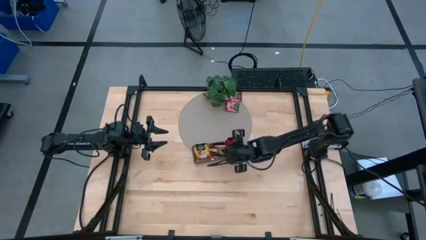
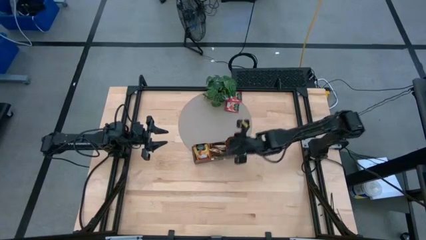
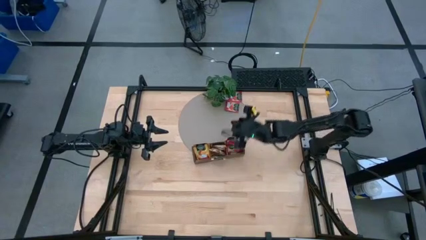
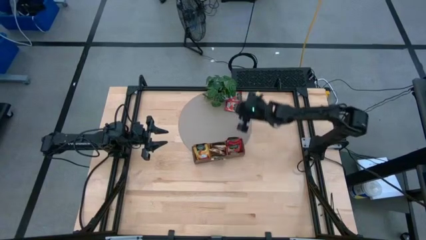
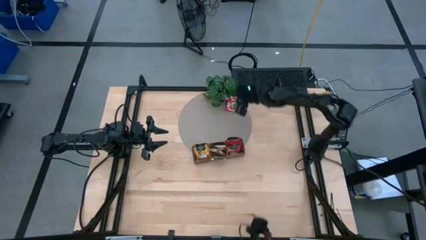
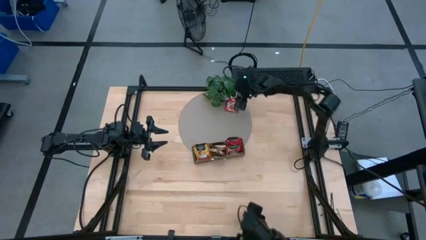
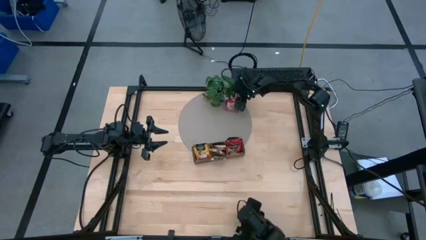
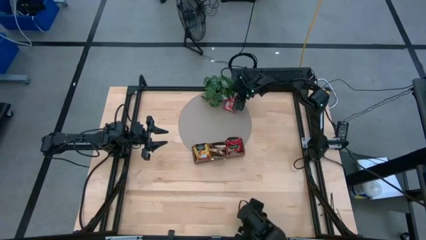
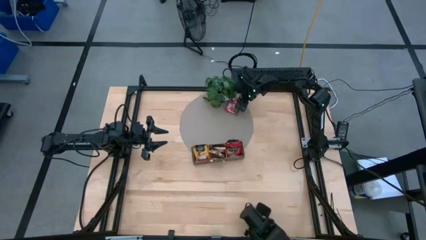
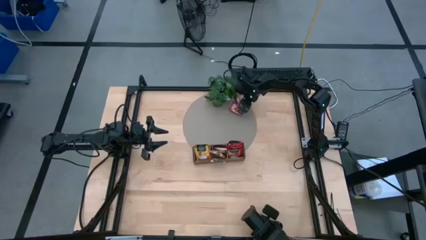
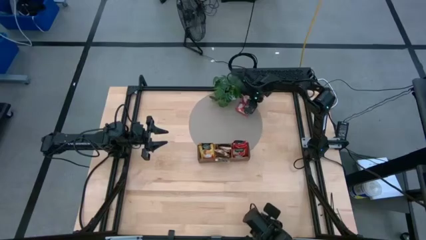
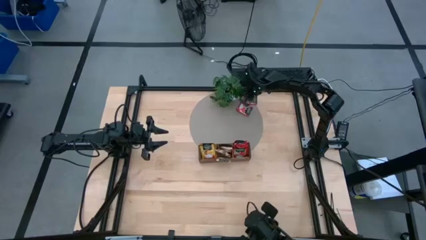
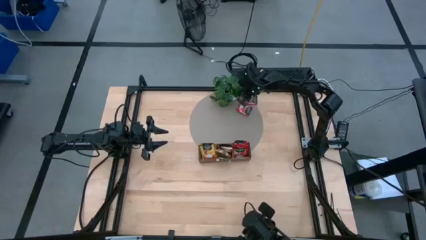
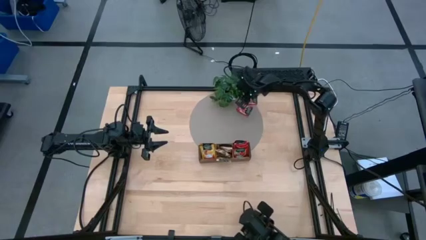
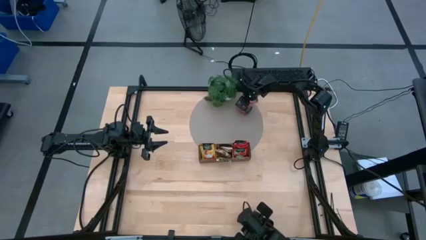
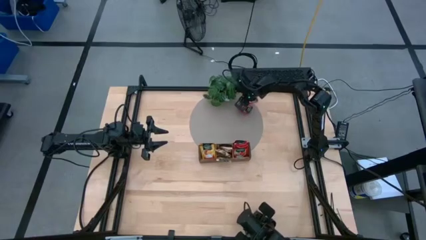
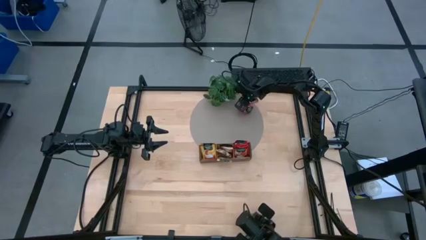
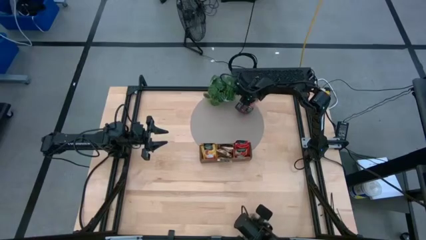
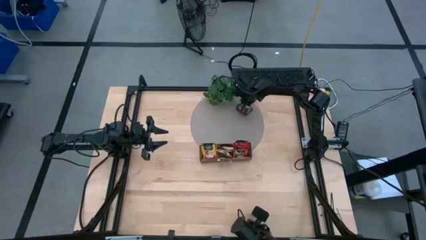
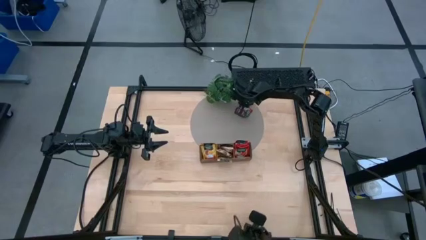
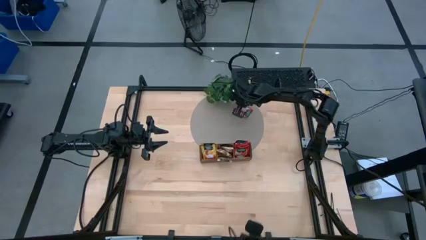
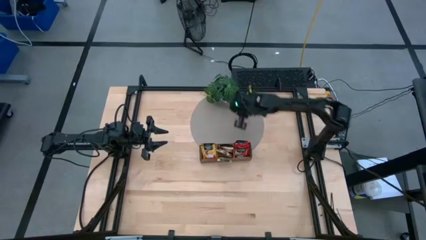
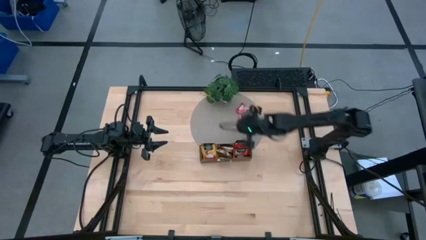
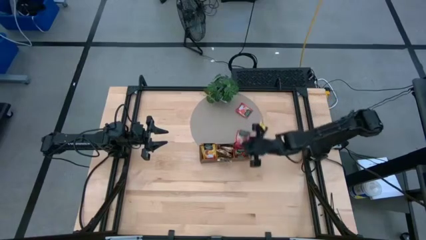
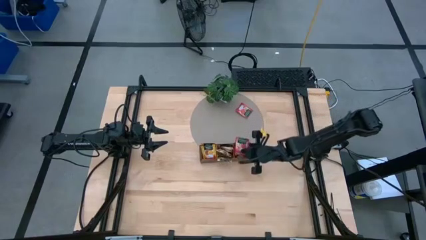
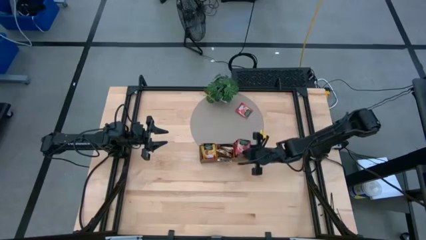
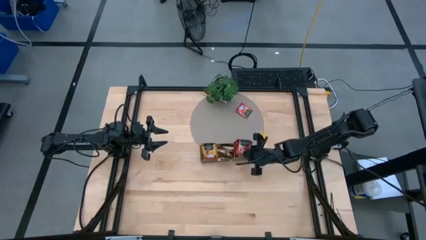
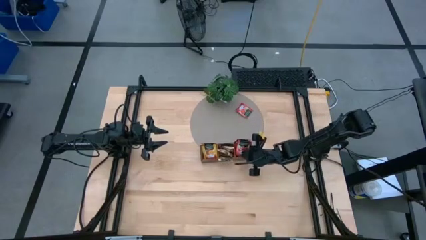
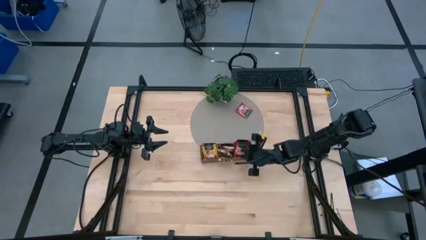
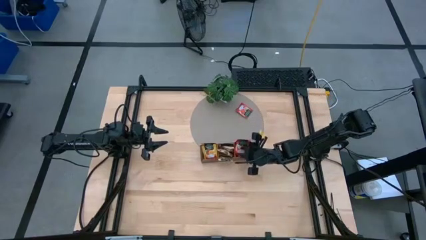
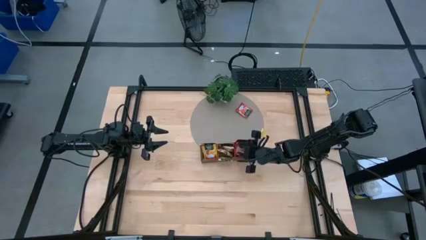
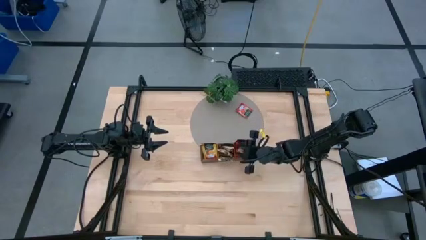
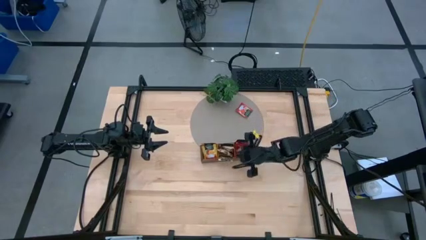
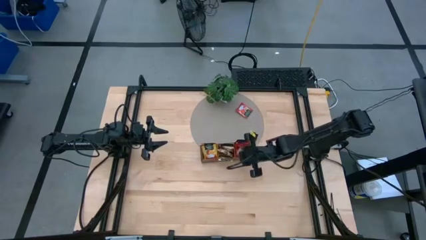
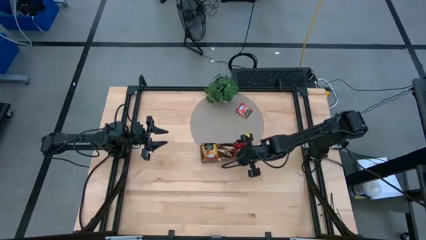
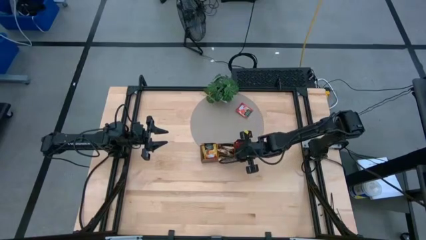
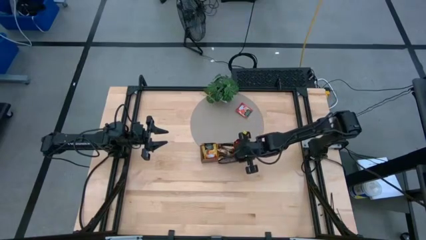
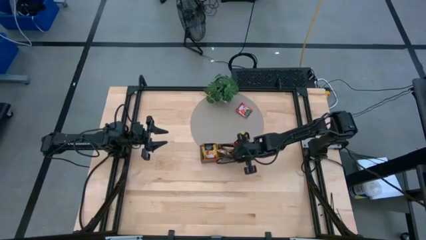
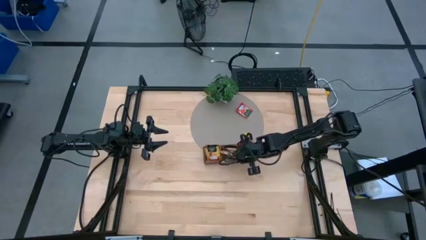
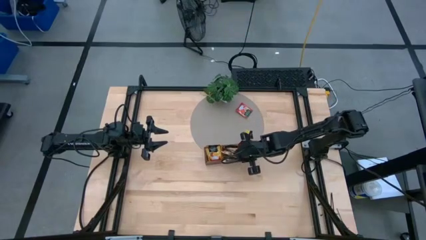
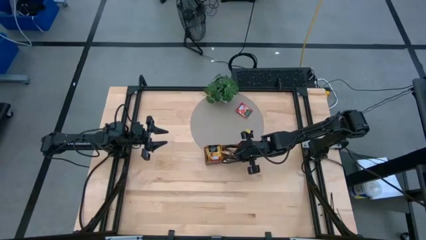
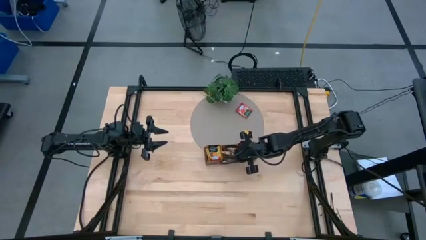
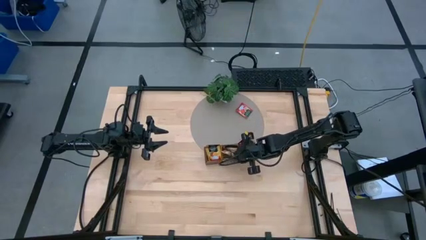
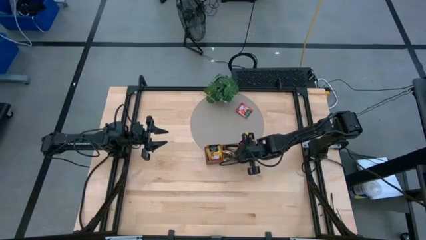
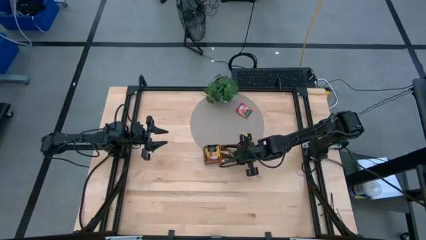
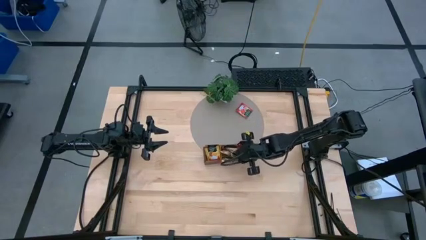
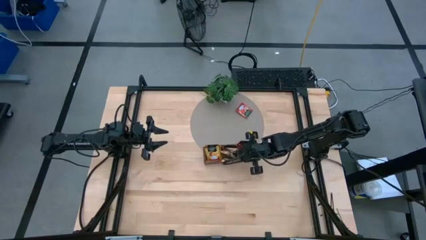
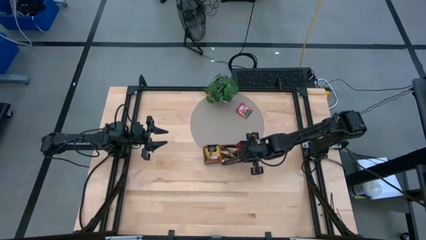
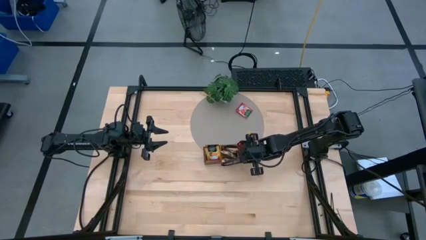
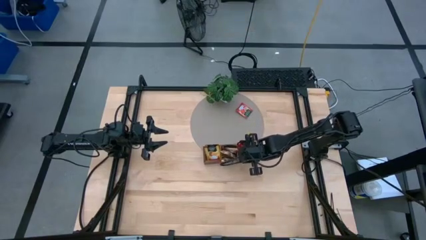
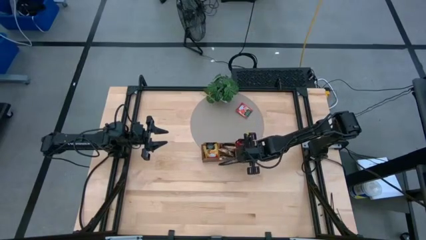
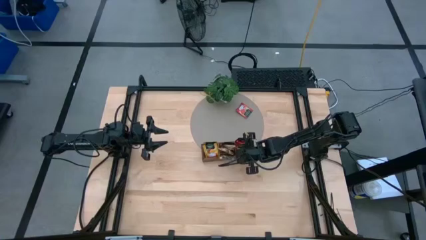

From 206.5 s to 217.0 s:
Task: Pick & Place Tea
Put the top red tea bag into the right slot of the wooden organizer

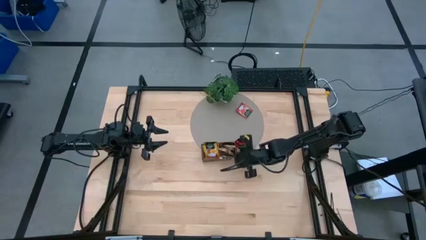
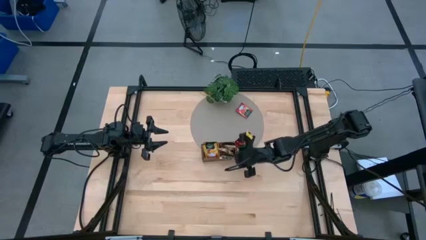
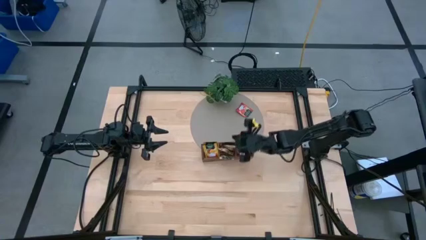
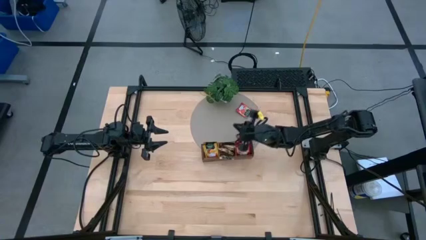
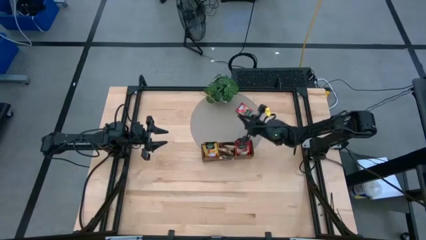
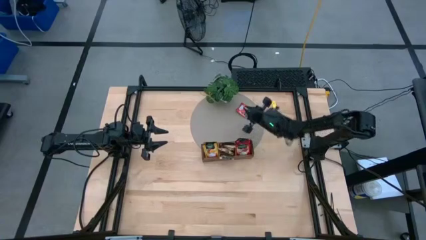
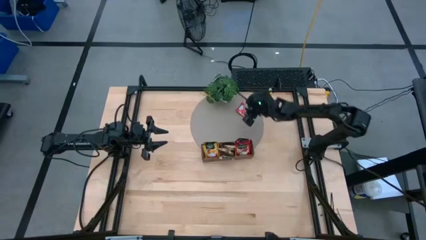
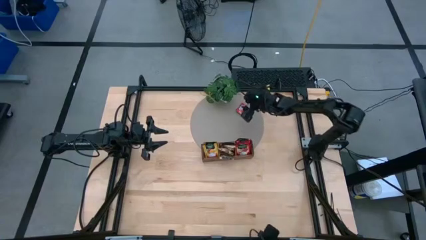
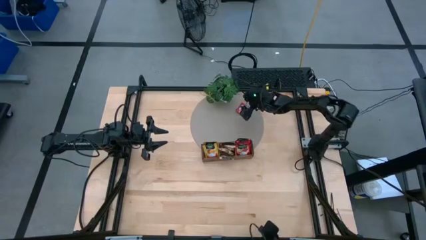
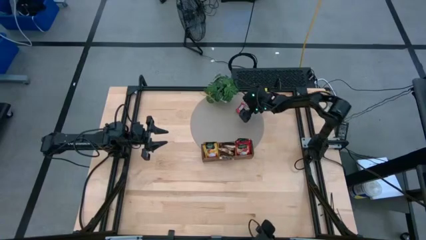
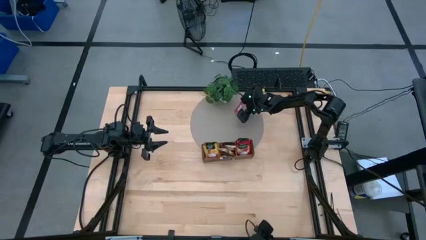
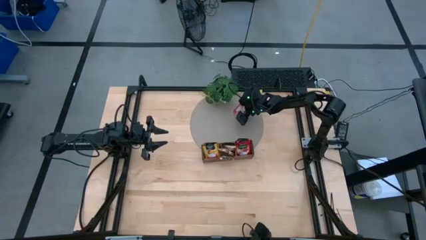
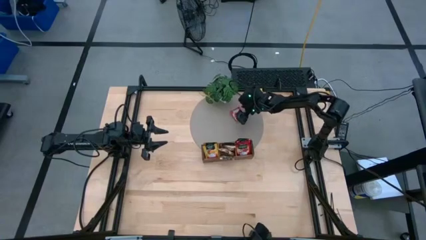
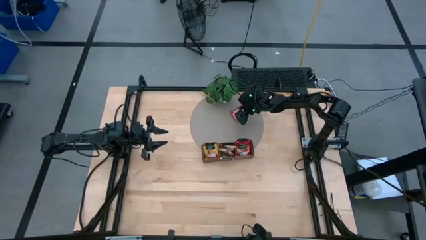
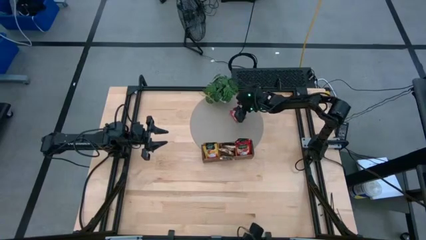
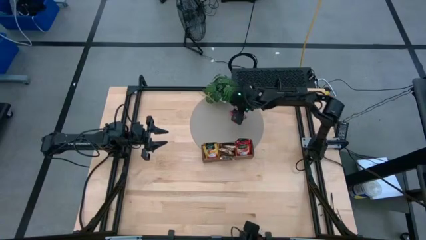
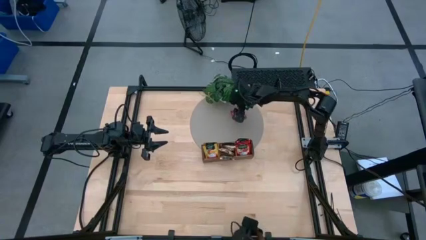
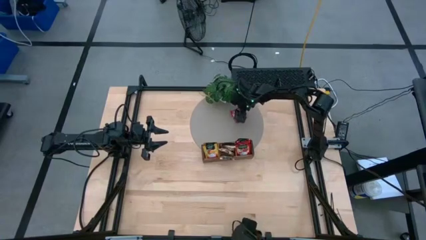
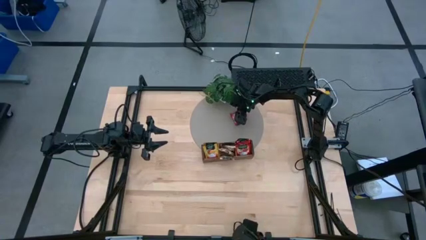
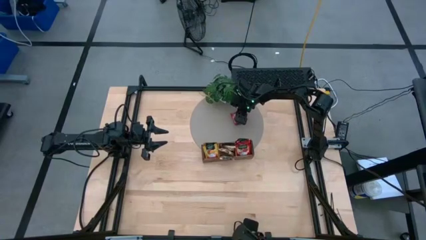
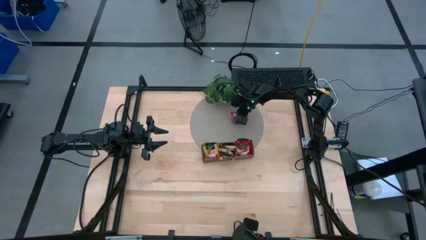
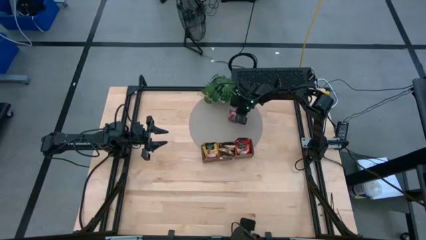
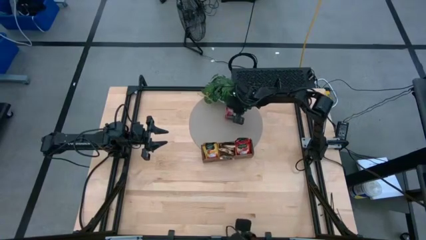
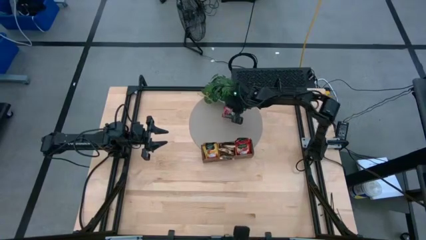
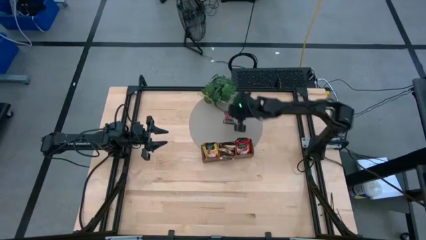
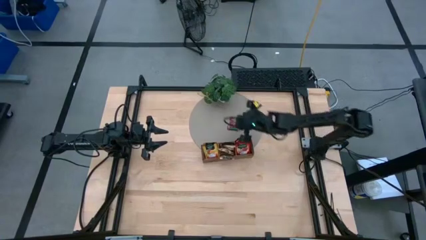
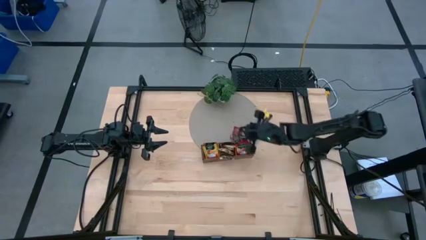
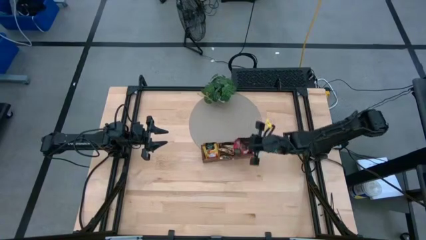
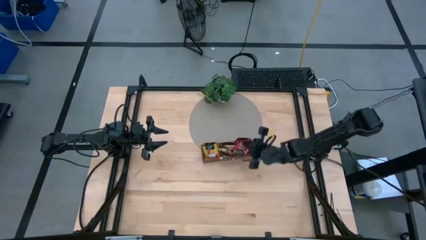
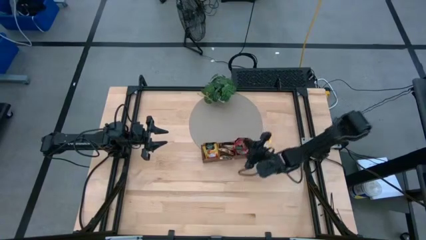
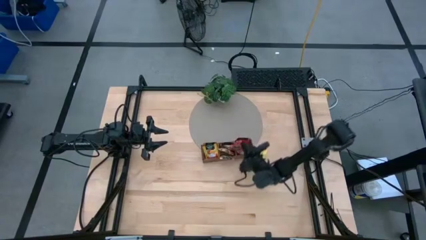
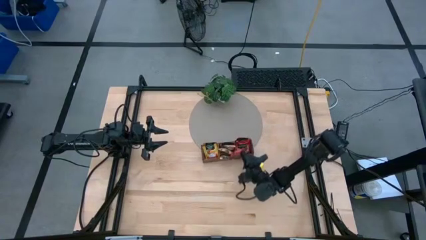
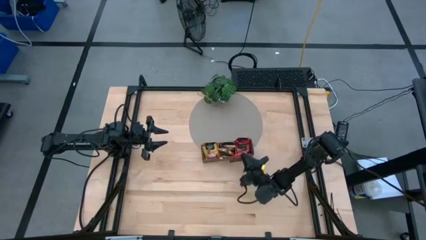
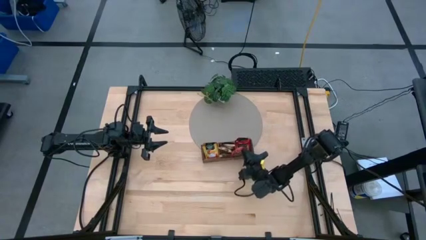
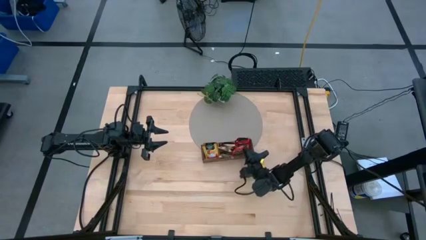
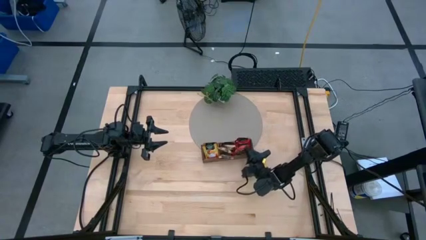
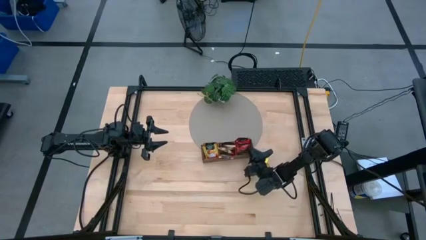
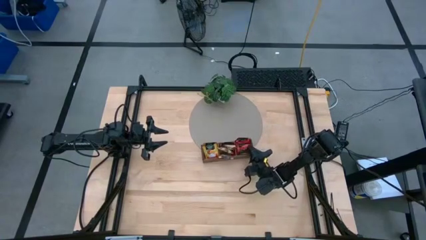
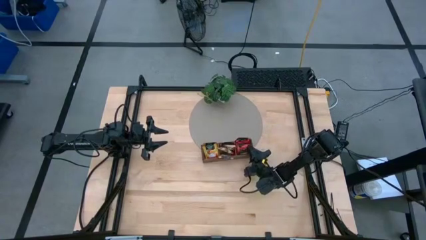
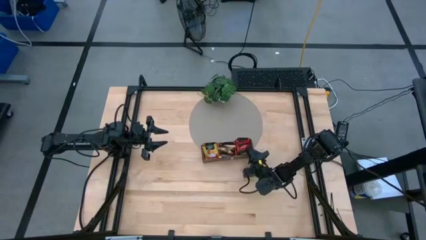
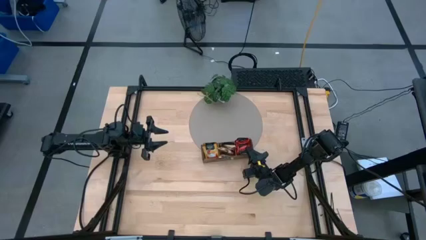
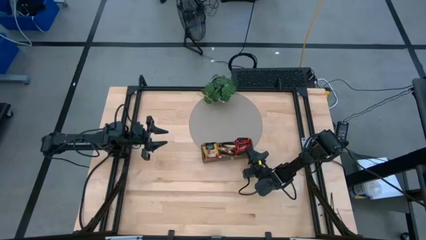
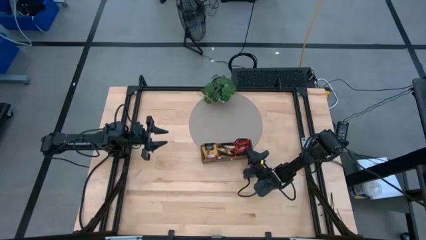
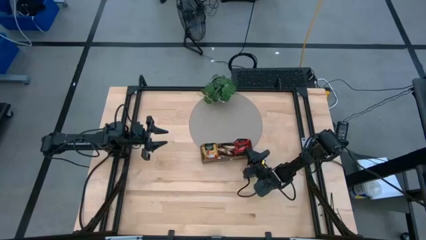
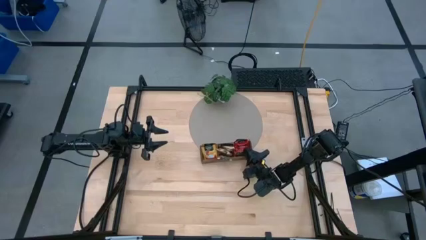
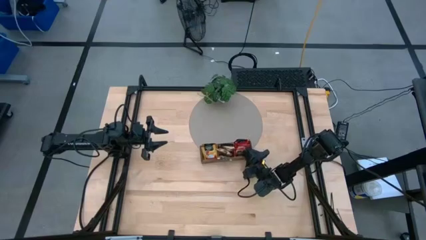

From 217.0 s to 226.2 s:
Put the red tea bag into the right slot of the wooden organizer
